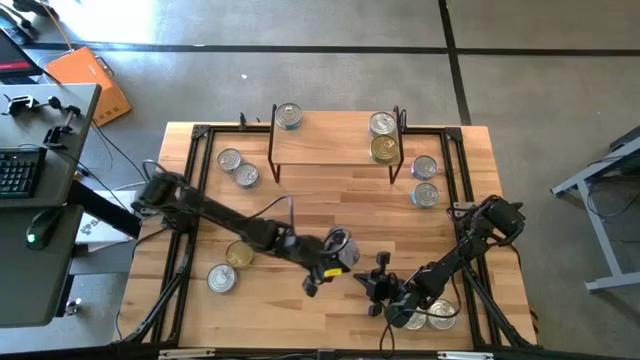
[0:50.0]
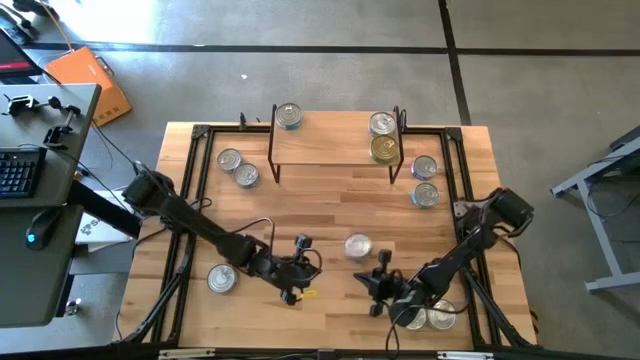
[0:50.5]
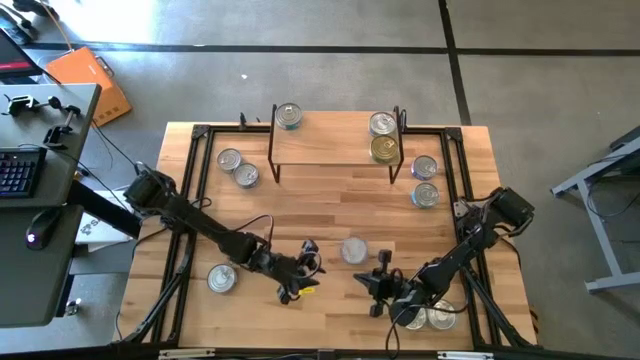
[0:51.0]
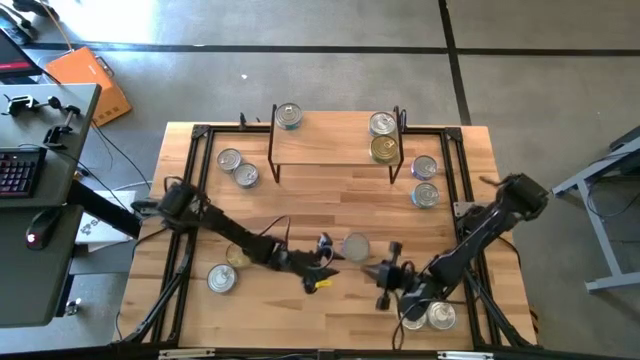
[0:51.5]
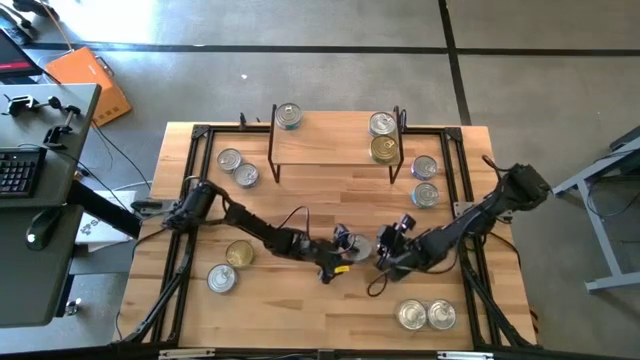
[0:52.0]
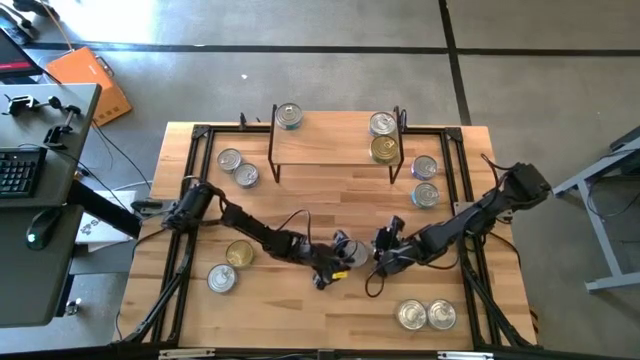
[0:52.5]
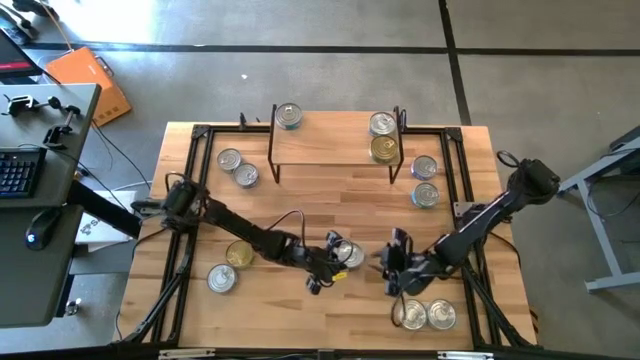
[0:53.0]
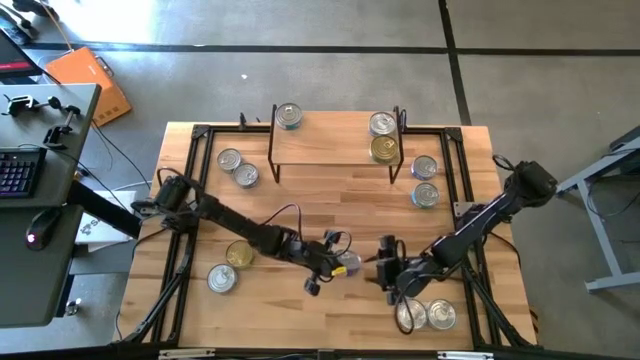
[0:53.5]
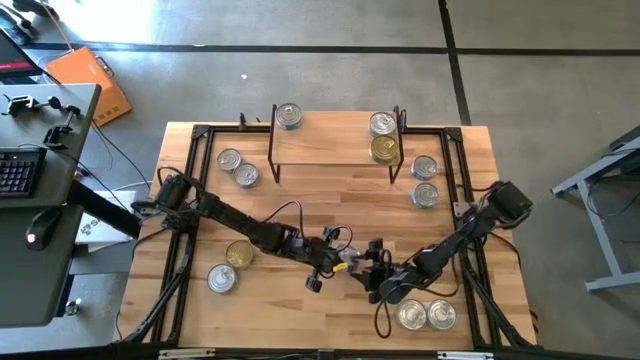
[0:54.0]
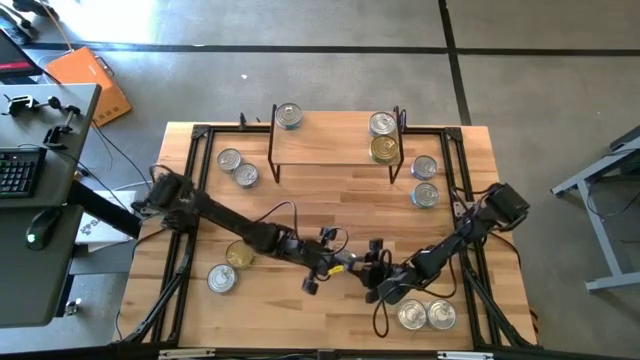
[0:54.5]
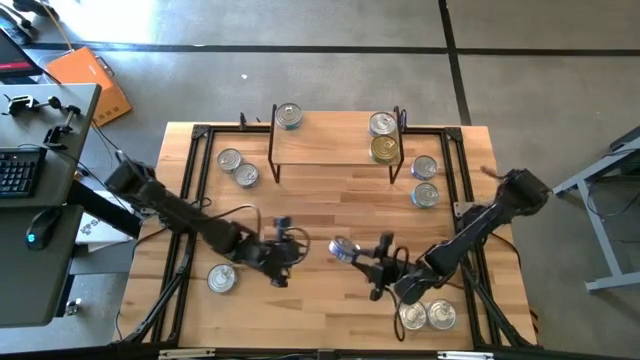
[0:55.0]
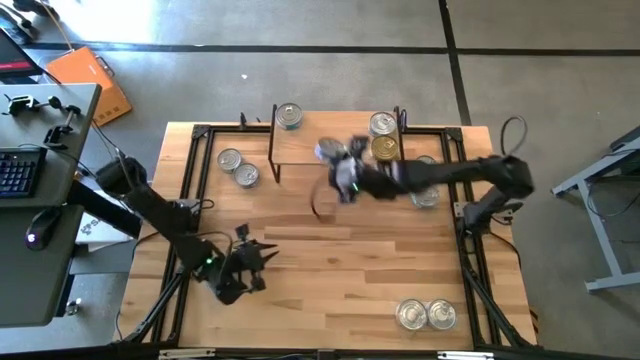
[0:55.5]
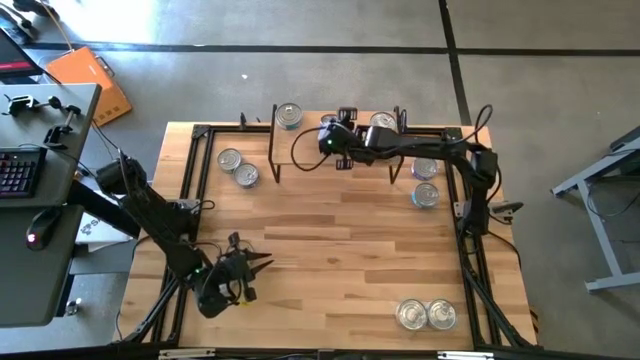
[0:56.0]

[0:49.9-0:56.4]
Task: Stack canned seafood by type on shelf
Put the blue tuna can on the shelf

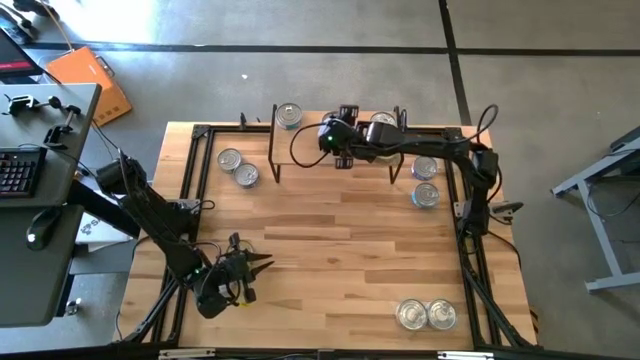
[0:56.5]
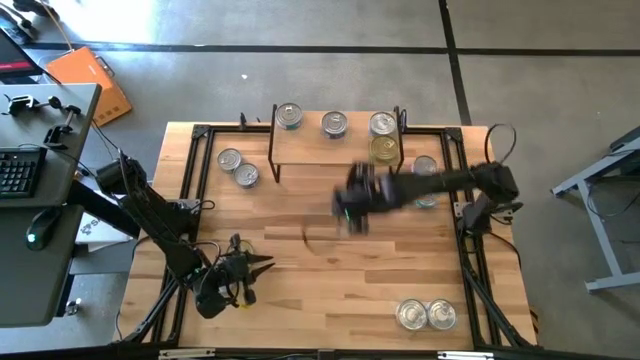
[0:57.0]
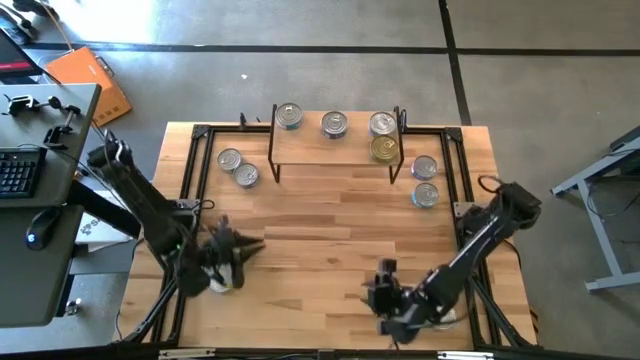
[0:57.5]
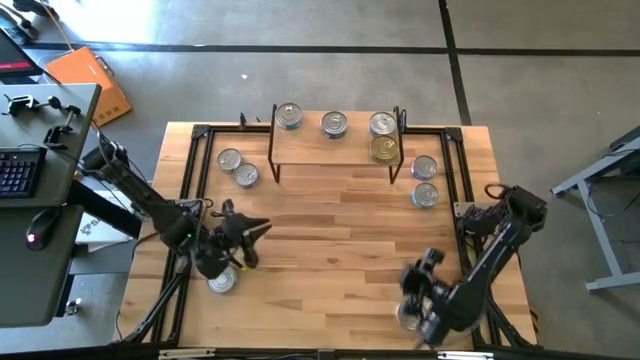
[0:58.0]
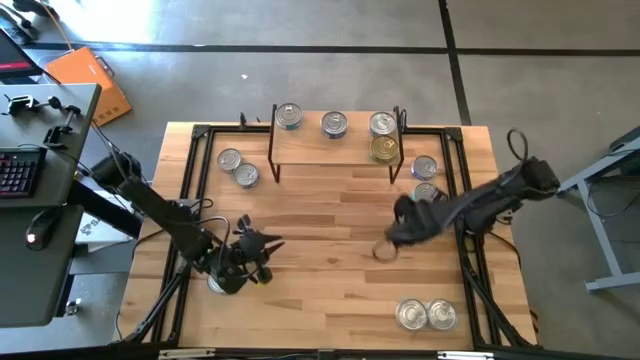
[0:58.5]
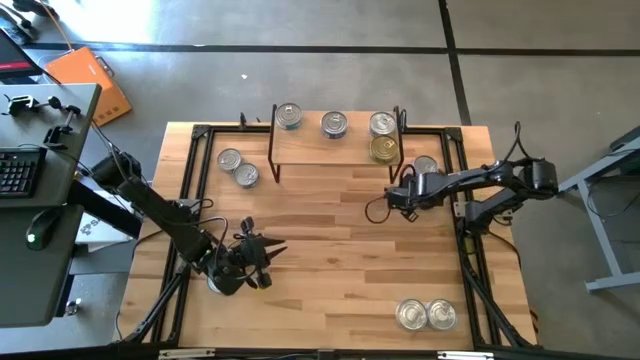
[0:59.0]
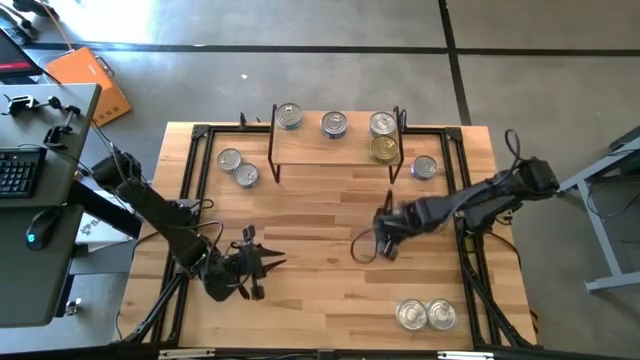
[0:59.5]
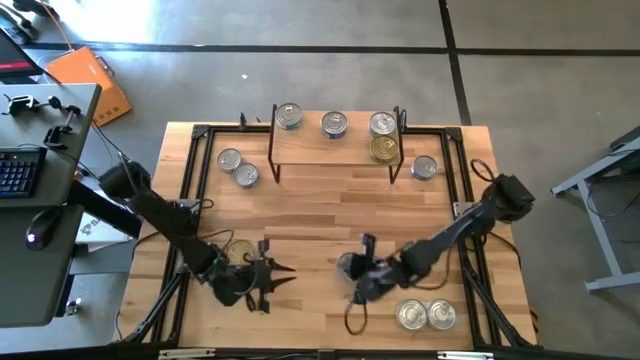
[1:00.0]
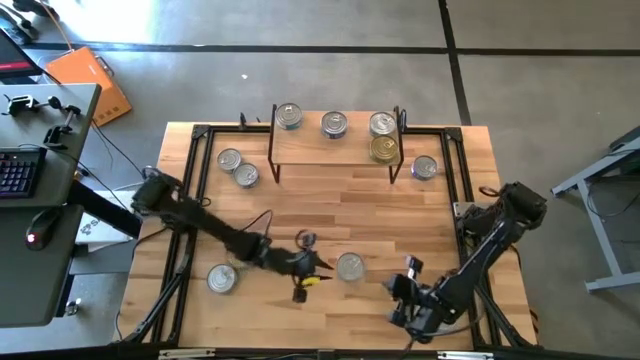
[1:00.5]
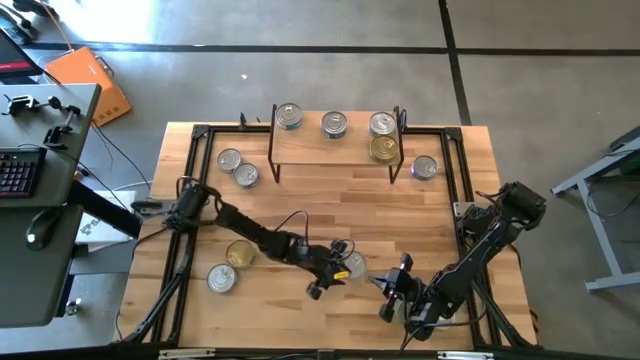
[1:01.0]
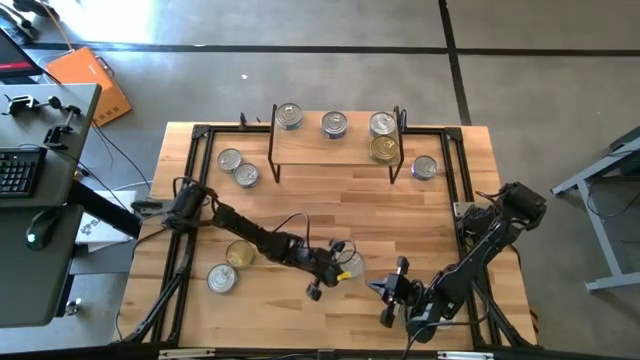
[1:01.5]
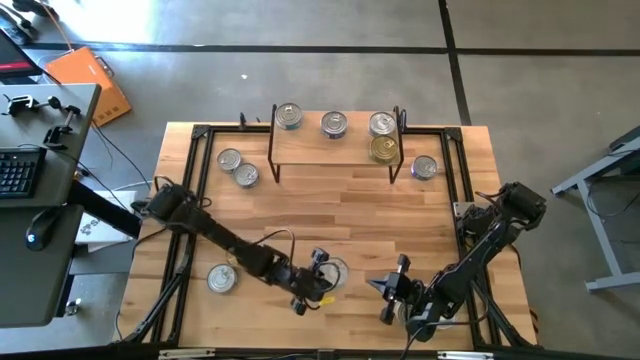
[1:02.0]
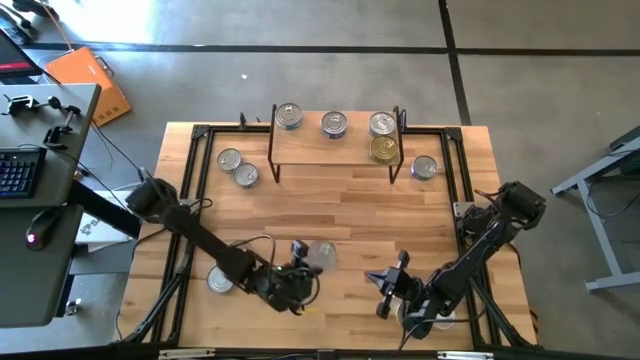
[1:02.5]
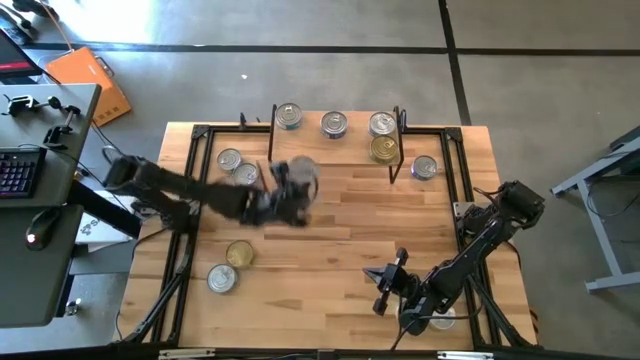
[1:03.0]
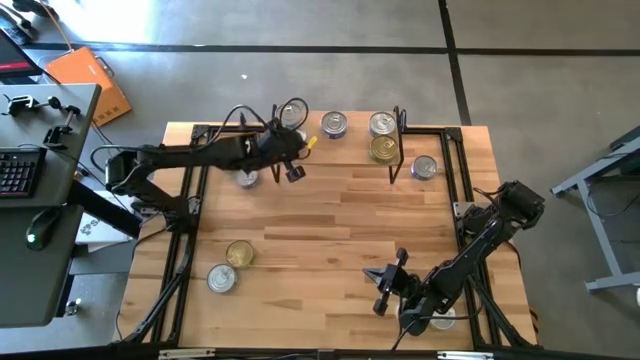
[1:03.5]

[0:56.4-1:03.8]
Put the yellow blue tuna can aligned with the other yellow blue tuna can on the shelf

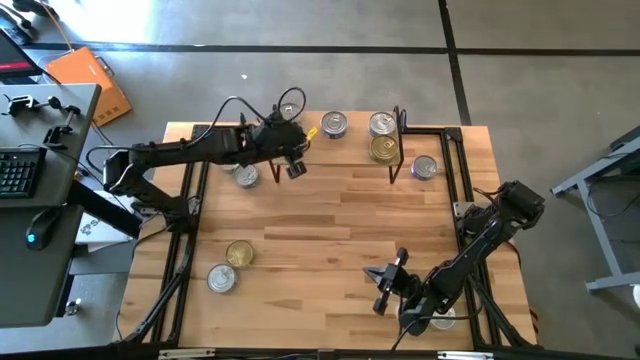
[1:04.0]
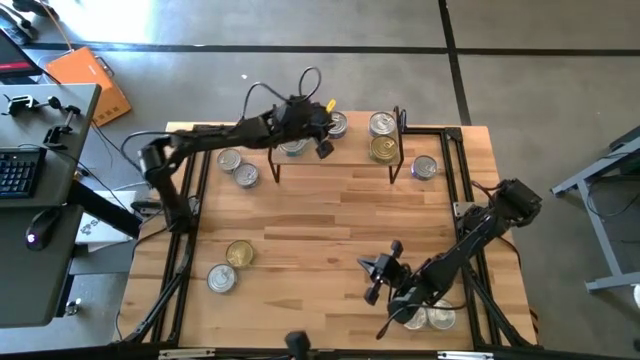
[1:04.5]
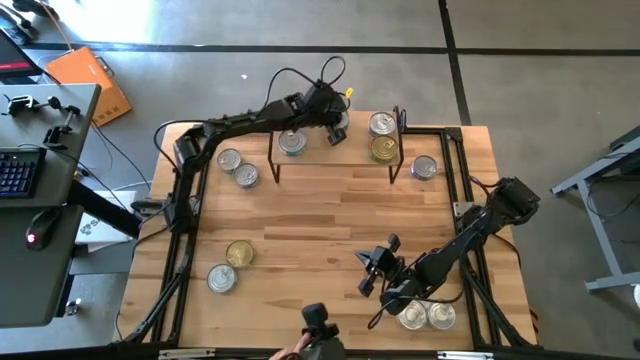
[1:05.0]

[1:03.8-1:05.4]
Adjust the blue tuna can on the shelf

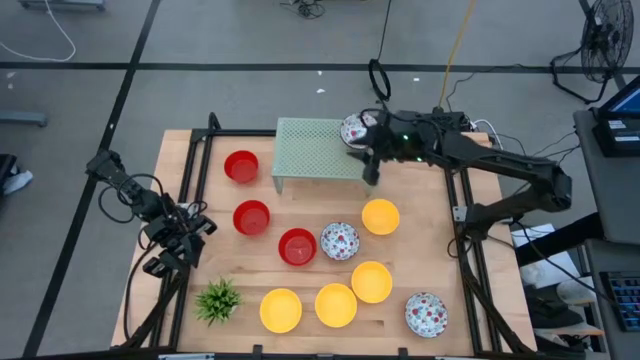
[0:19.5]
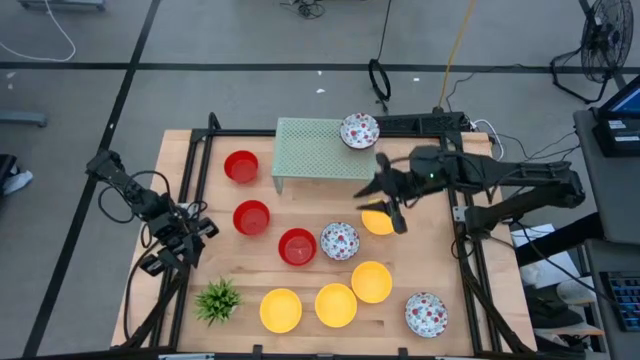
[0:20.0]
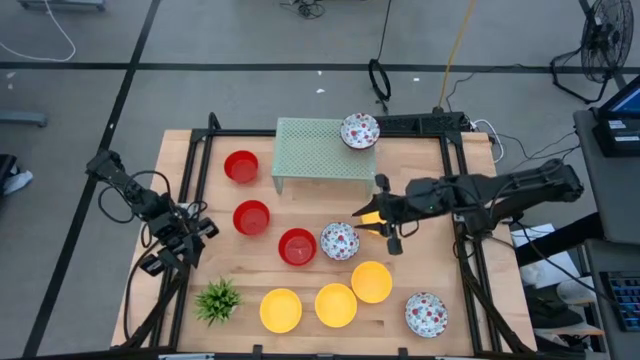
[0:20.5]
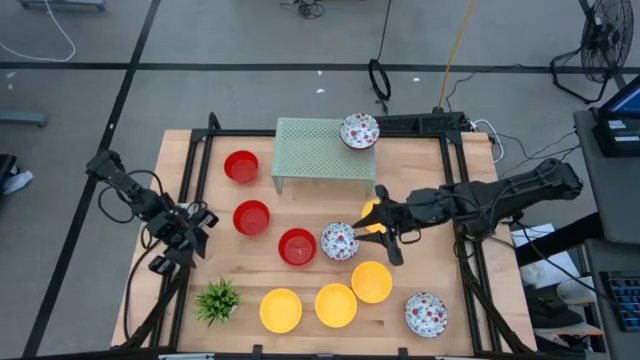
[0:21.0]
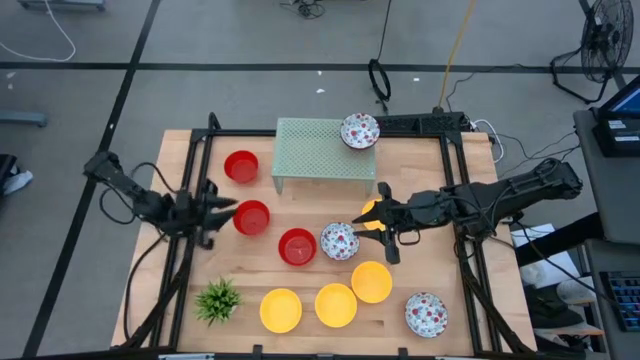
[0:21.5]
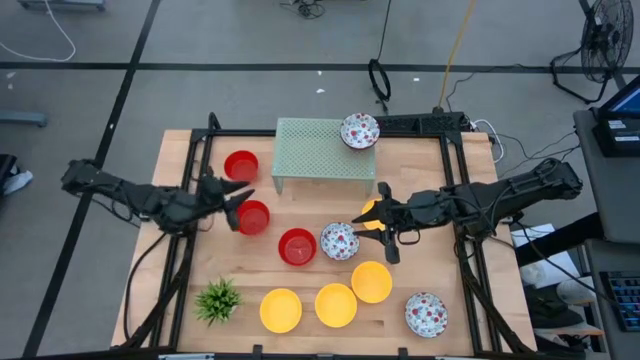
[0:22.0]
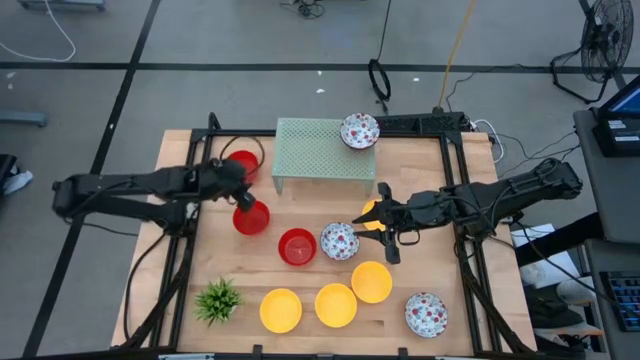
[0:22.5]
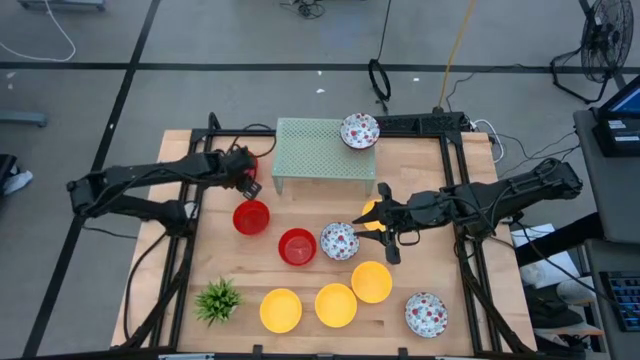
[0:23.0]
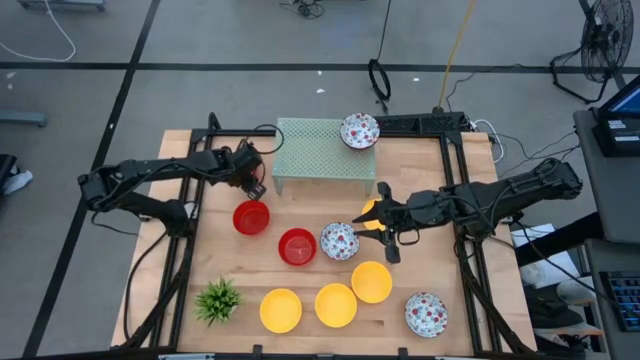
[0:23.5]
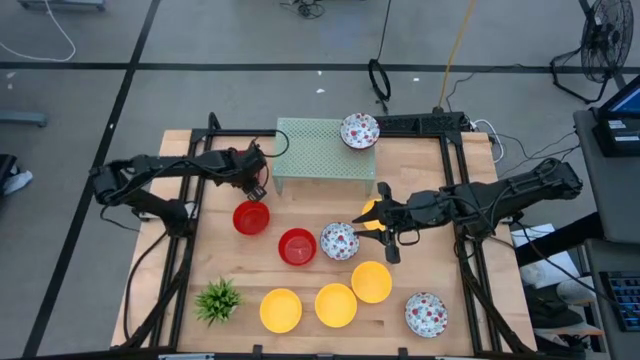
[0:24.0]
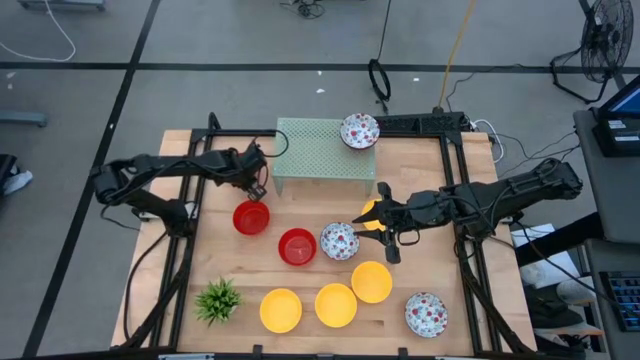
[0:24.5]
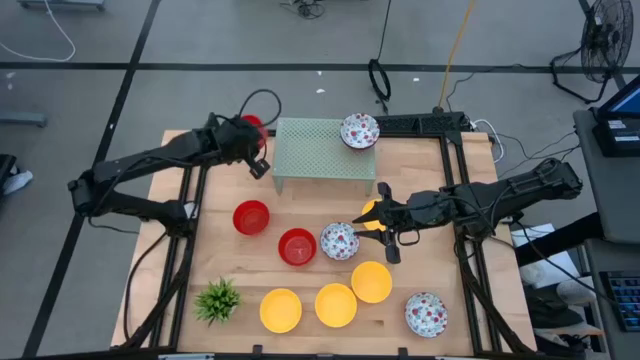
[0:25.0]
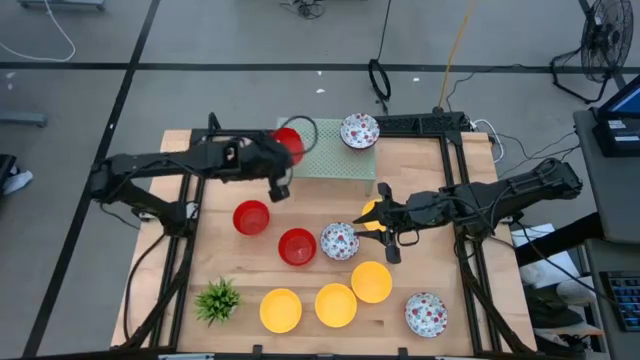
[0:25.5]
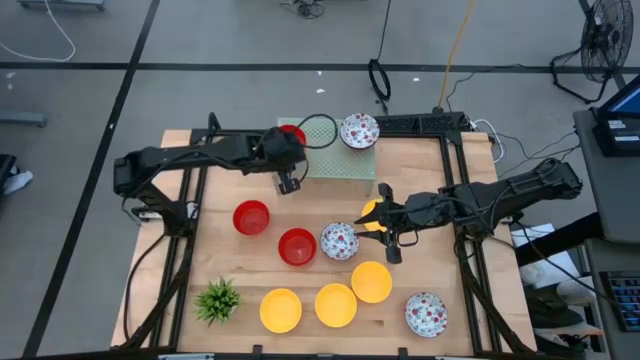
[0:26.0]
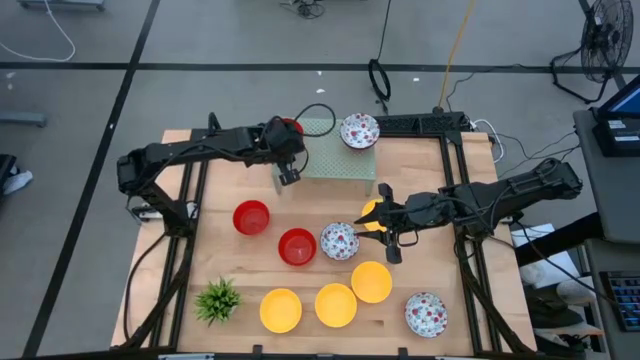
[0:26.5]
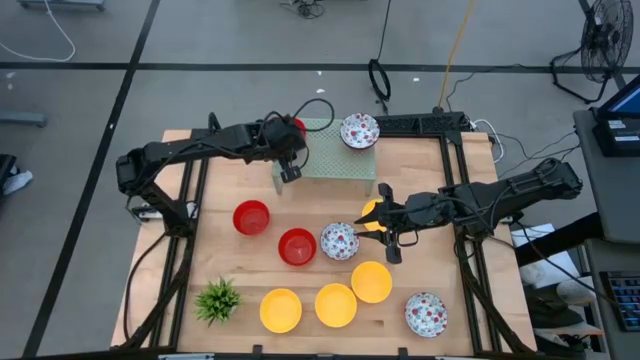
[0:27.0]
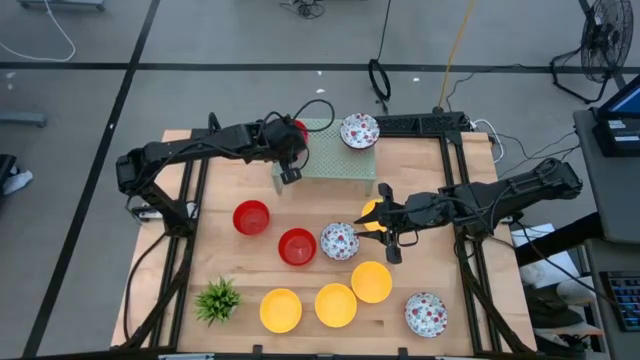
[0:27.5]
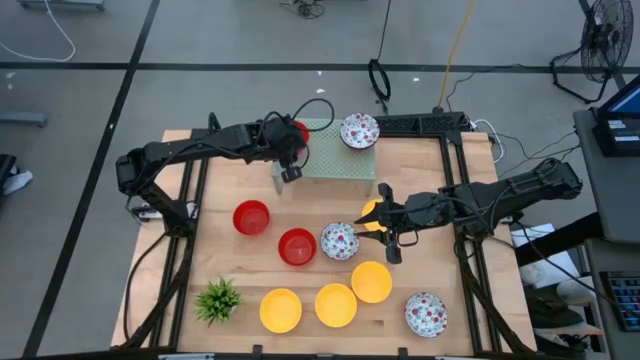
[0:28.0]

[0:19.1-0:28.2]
Task: Pick & Place Mini bowls
Put the red bowl on the shelf
